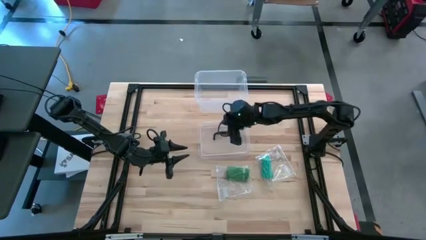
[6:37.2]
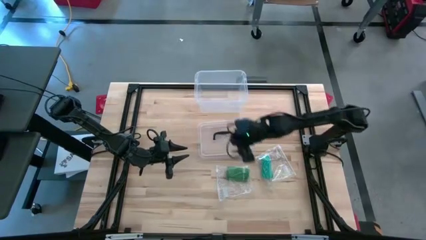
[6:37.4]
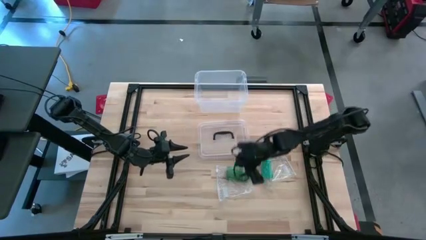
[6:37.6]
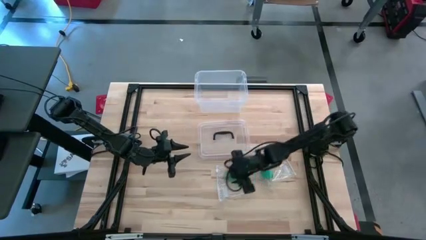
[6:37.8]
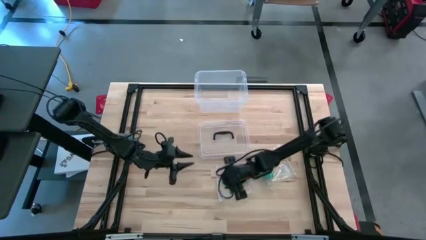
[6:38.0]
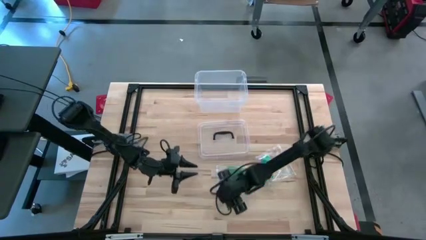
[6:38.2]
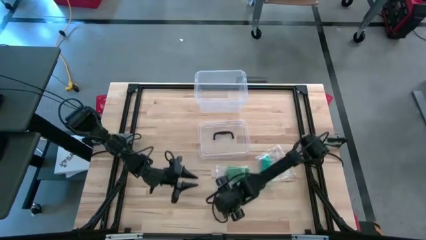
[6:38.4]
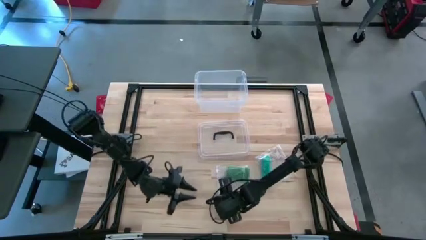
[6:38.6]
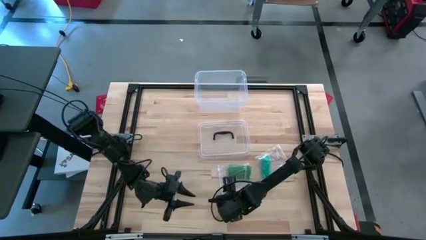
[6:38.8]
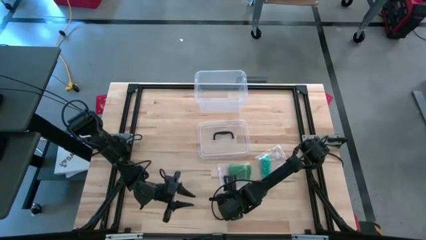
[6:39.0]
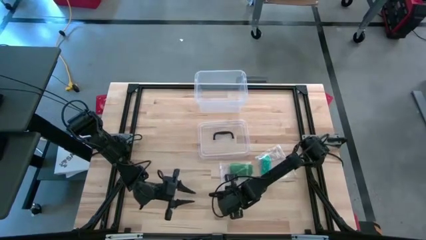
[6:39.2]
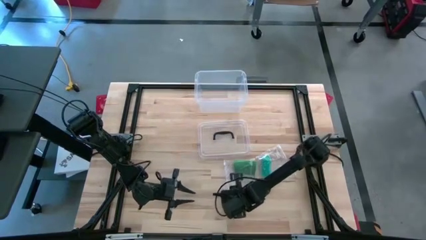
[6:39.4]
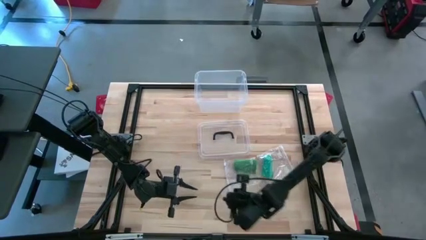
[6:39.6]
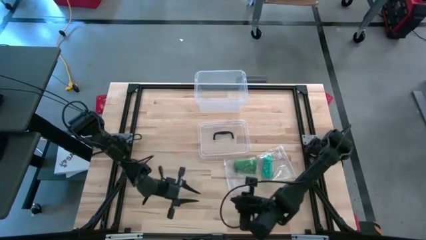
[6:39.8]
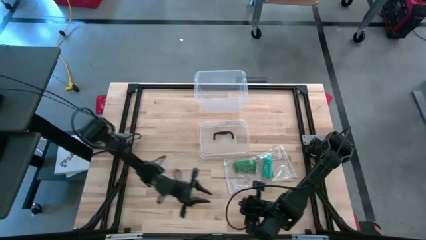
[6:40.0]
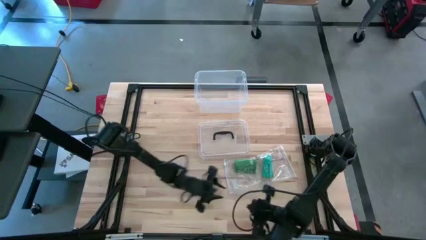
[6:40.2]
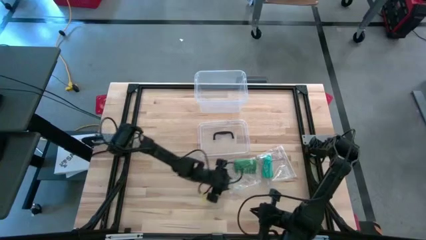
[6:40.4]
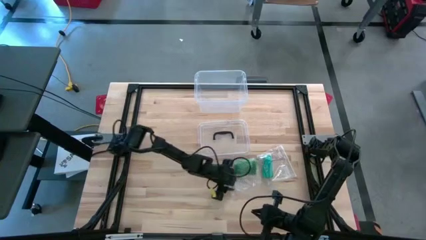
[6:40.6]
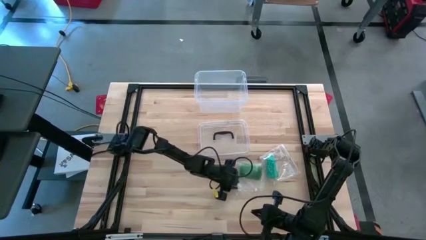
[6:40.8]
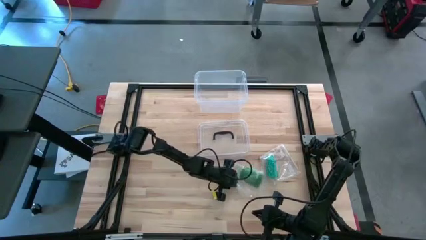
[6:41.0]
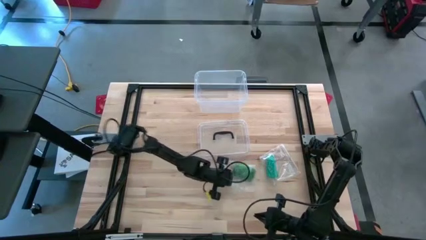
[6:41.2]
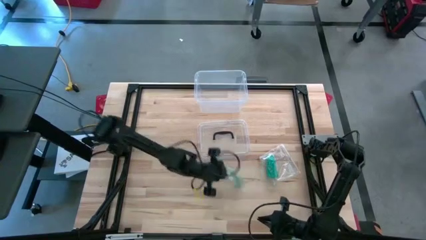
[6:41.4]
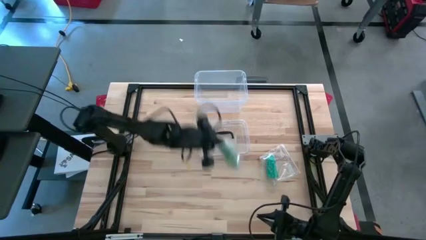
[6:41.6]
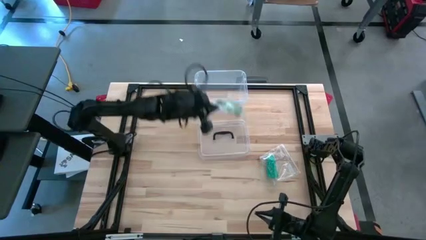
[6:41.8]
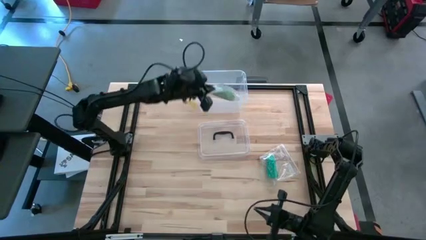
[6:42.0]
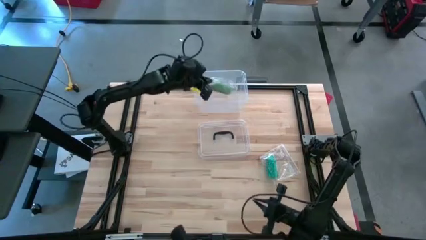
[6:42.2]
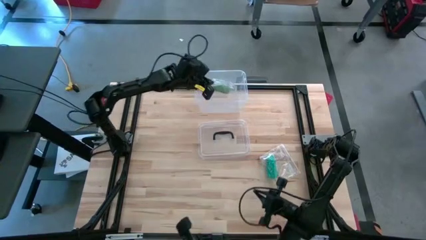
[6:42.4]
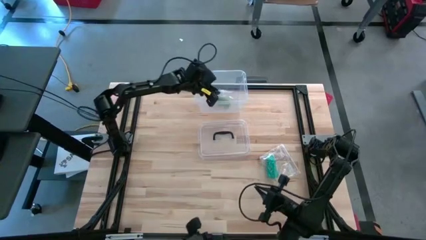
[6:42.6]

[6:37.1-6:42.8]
Task: Roll bandage
Put the packaged green bandage into the transparent bin

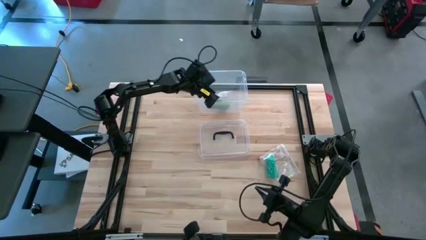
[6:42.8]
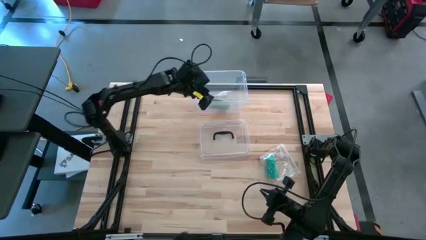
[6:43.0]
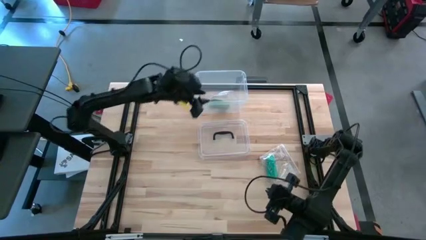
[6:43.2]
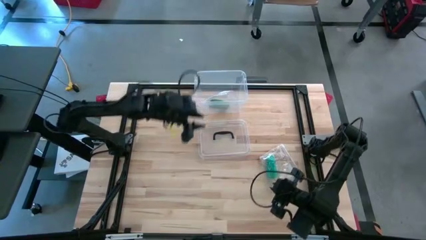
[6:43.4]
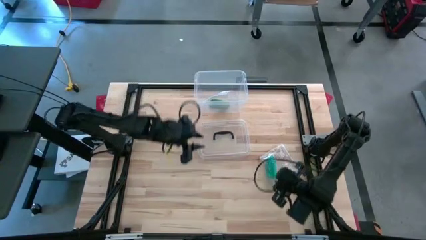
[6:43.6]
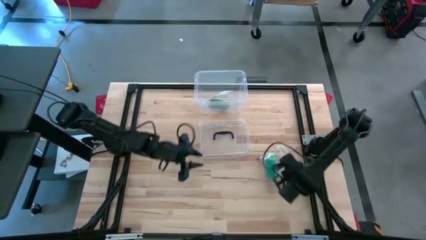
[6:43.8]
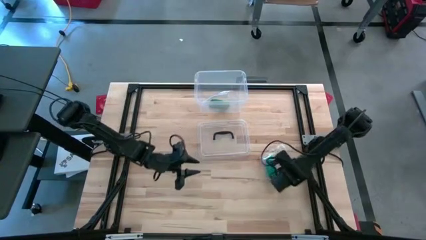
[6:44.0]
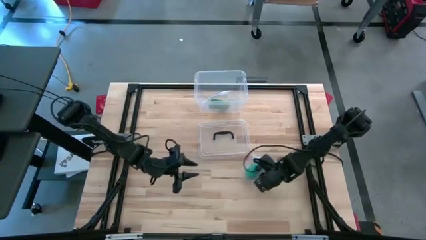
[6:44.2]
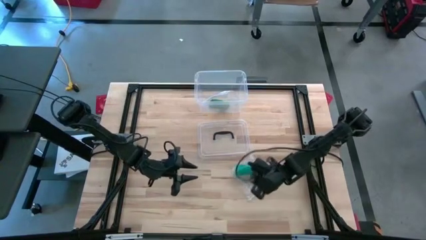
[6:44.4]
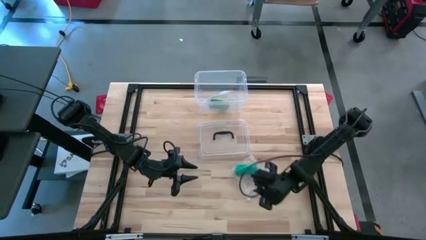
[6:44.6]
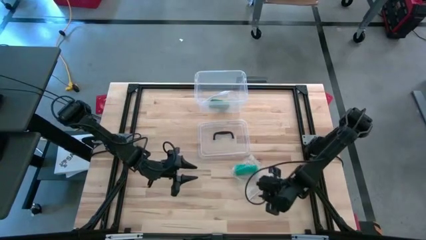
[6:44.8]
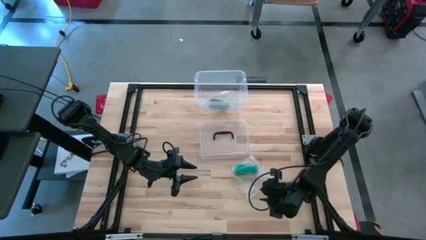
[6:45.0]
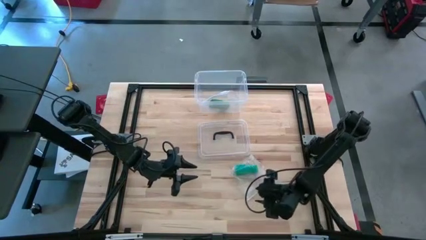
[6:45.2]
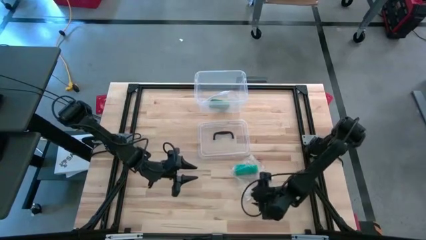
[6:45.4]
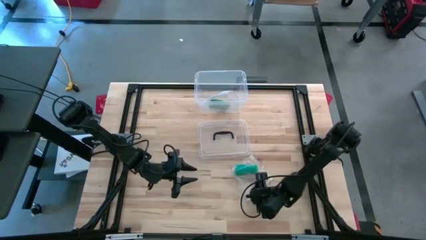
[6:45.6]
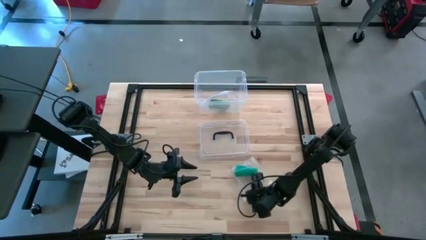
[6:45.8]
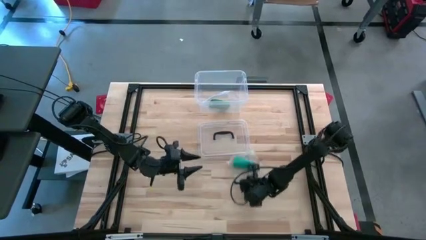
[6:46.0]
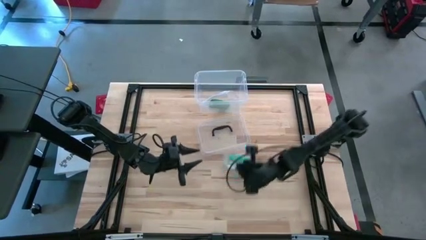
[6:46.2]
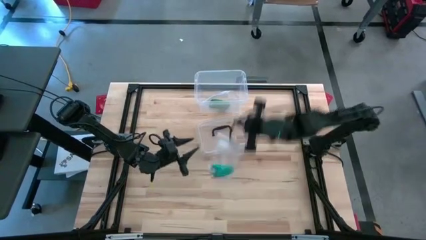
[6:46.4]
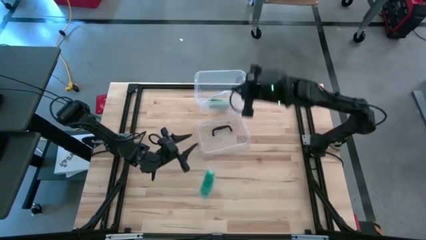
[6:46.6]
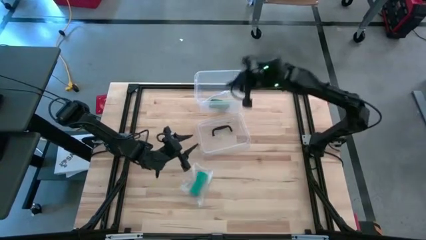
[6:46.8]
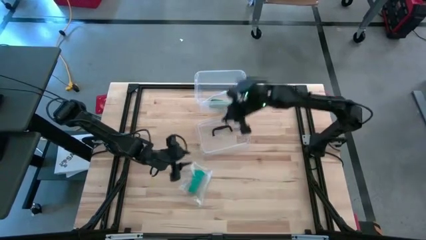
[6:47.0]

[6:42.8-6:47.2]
Put the packaged blue bandage into the transparent bin

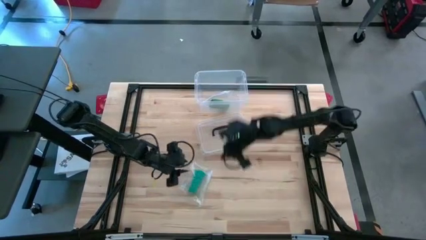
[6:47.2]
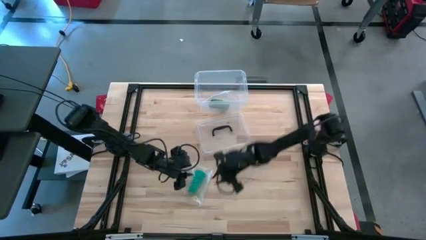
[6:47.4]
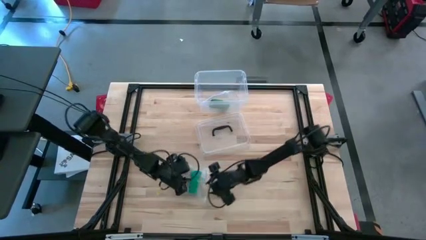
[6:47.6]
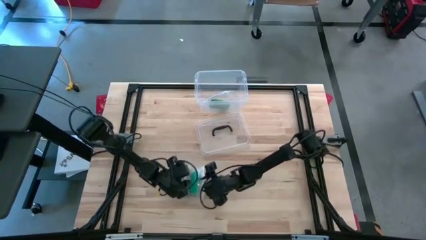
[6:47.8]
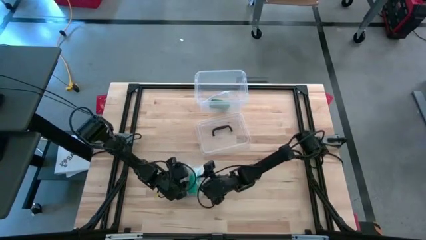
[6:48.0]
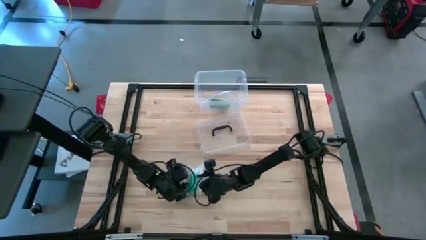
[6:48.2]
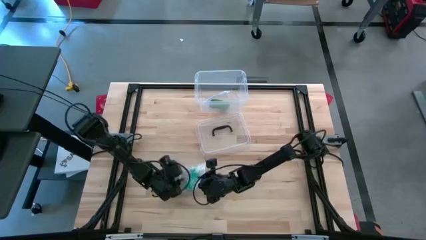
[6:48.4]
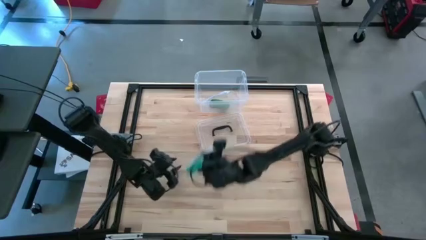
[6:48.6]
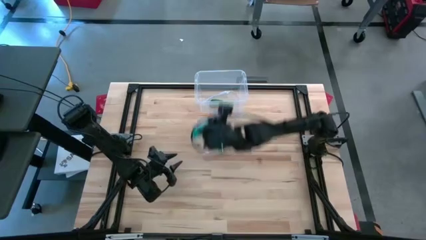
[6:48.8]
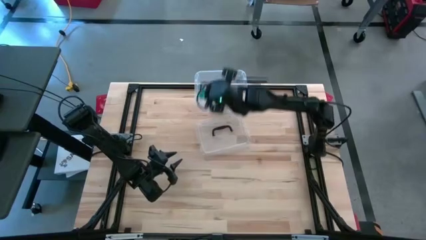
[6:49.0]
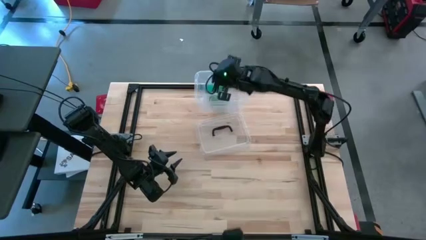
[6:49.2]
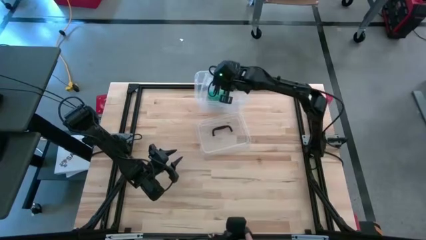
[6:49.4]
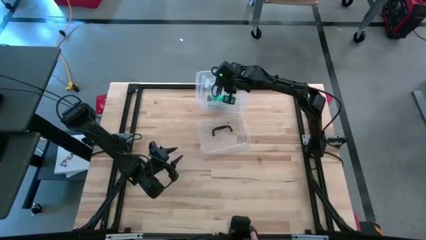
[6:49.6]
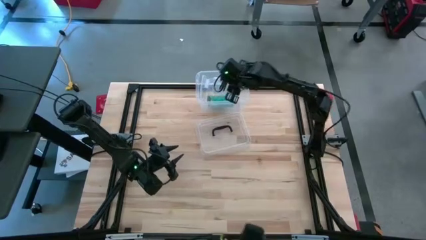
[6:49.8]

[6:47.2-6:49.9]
Put the packaged blue bandage into the transparent bin

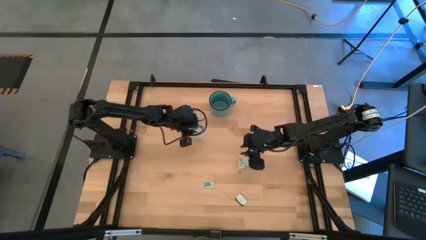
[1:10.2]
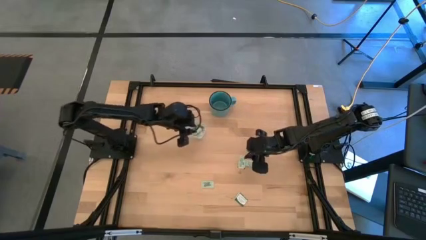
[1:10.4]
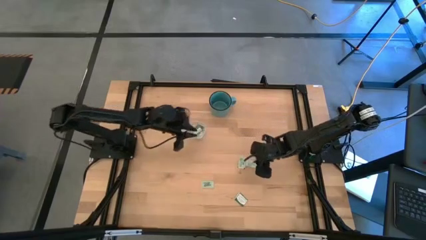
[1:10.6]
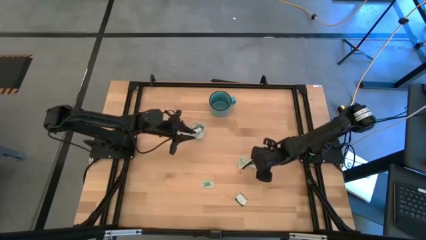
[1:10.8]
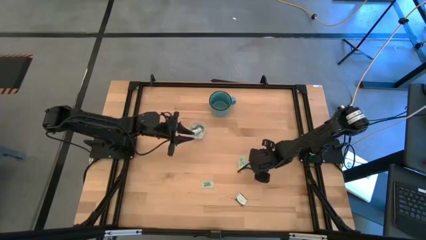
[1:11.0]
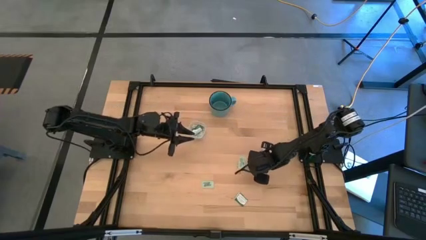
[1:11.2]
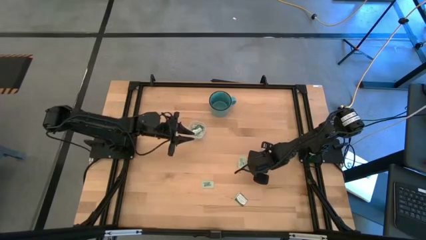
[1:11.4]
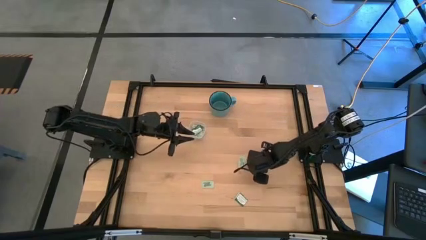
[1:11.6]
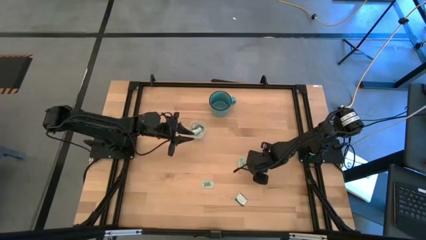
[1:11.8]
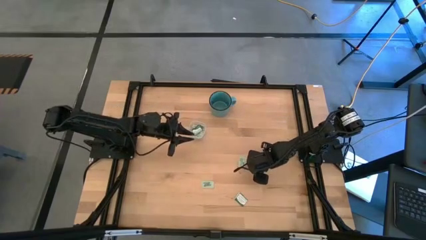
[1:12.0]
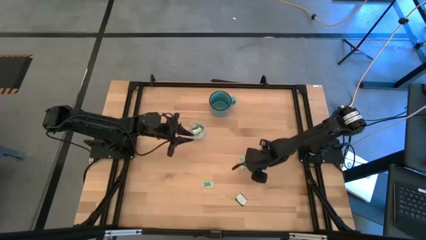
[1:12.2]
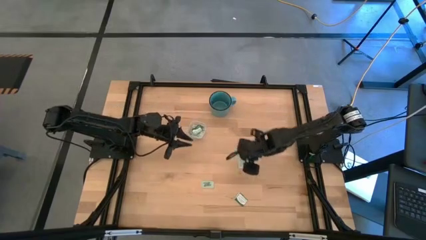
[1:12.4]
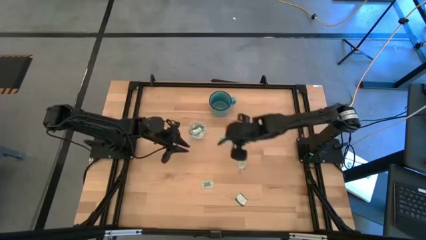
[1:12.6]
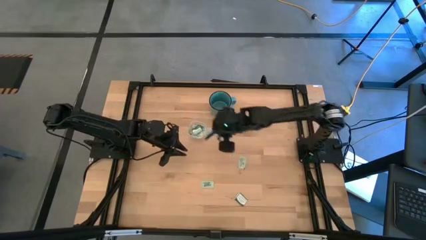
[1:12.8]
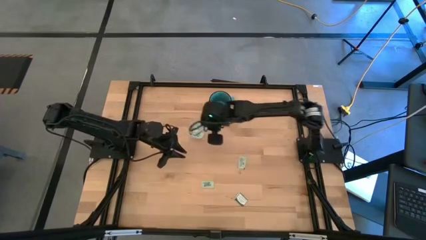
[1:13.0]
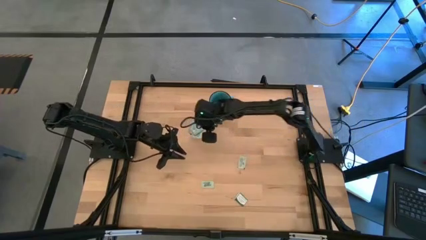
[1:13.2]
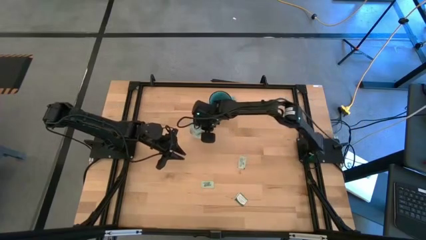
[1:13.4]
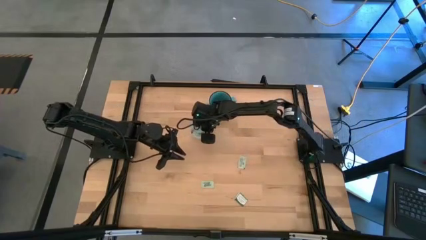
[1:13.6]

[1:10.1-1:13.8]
Task: Pick and place Stevia / Truvia into bins
Put the green stevia packet into the transparent container
